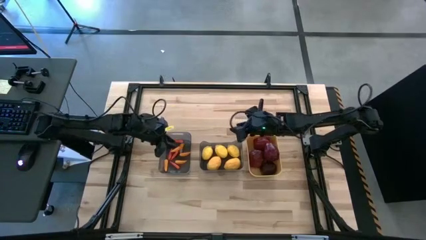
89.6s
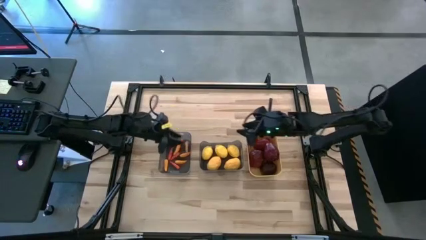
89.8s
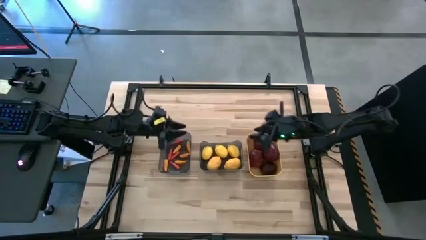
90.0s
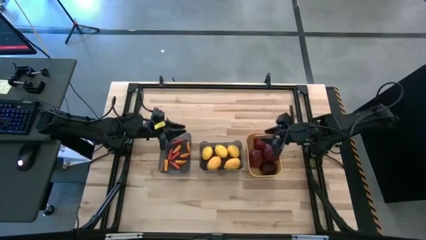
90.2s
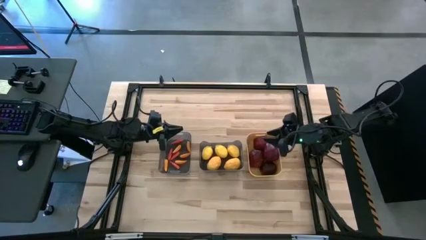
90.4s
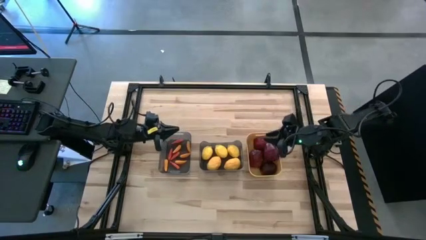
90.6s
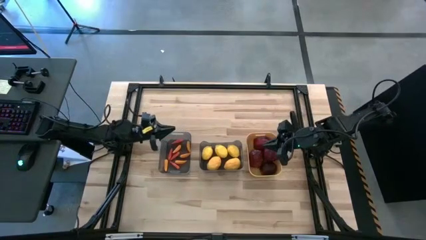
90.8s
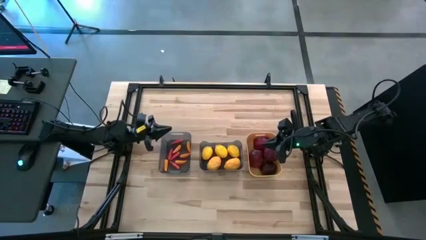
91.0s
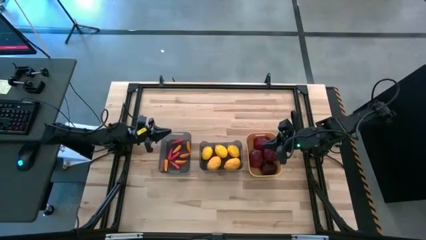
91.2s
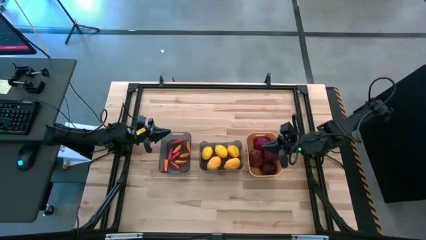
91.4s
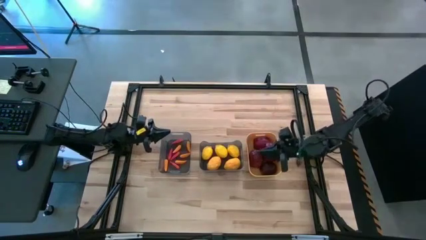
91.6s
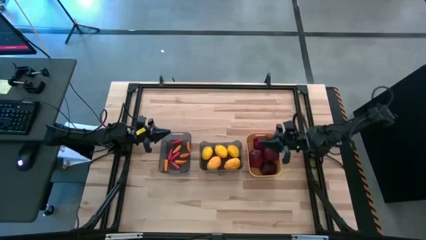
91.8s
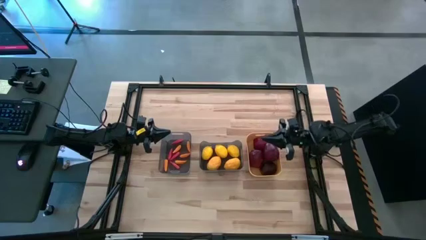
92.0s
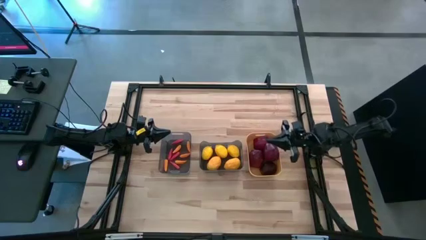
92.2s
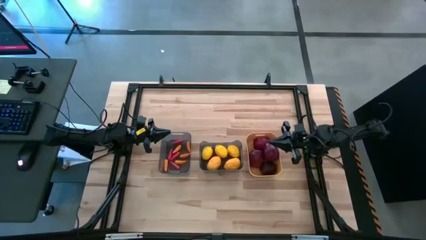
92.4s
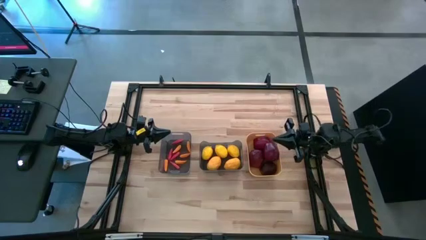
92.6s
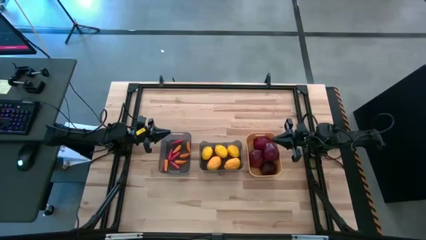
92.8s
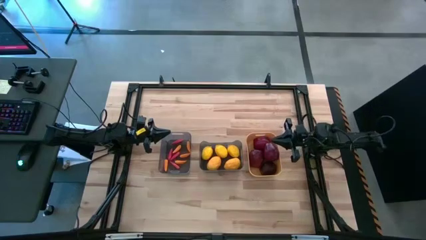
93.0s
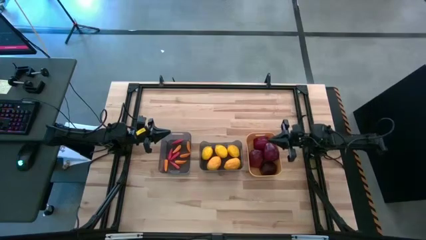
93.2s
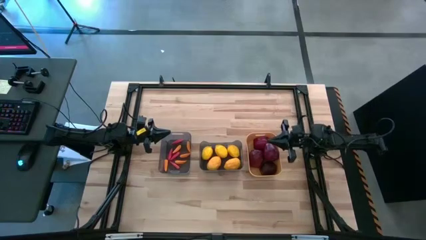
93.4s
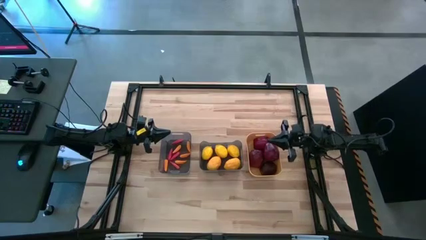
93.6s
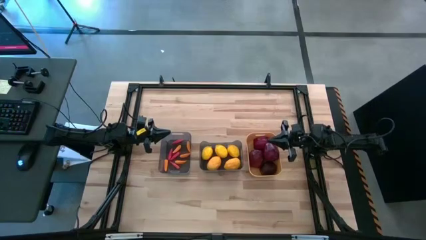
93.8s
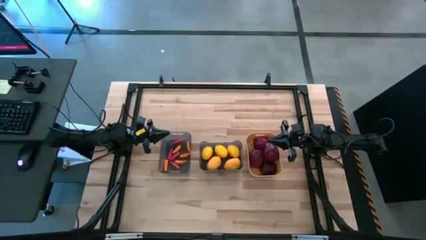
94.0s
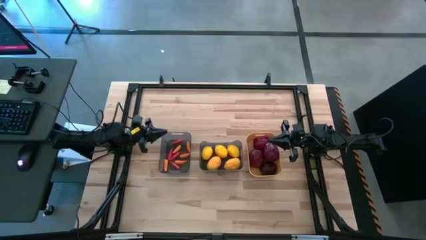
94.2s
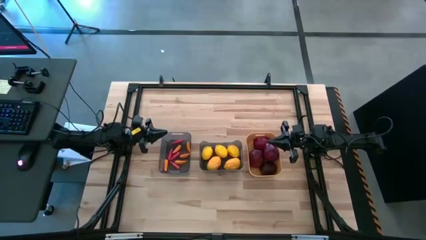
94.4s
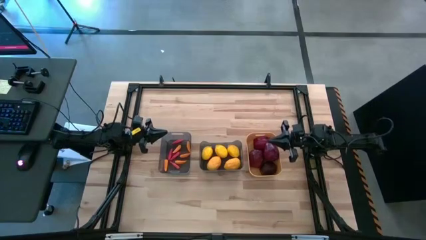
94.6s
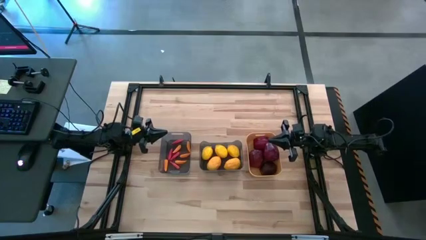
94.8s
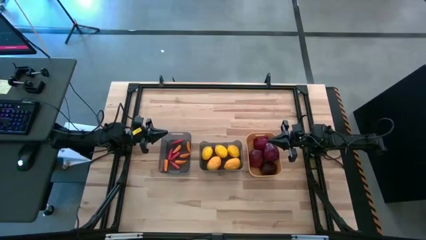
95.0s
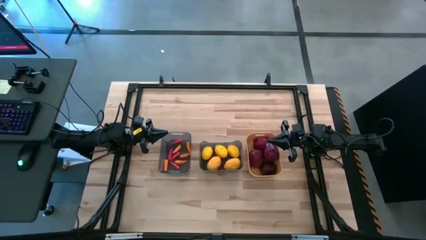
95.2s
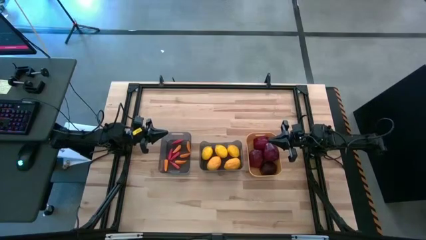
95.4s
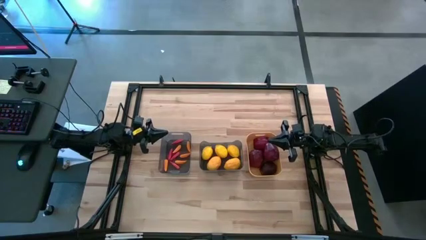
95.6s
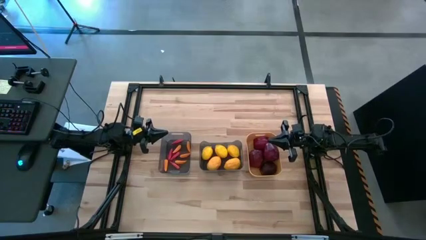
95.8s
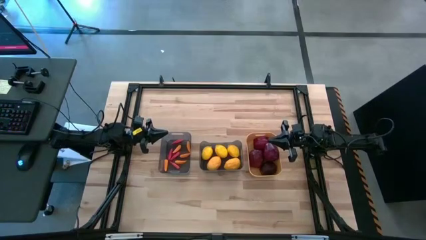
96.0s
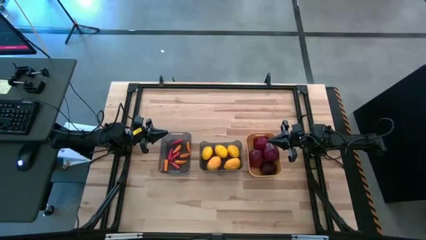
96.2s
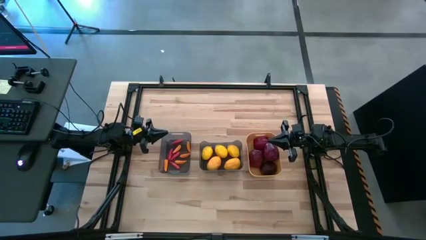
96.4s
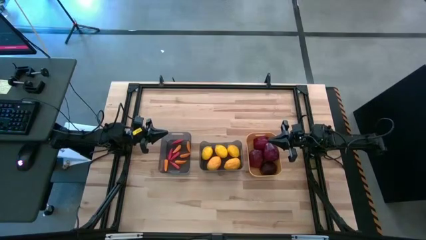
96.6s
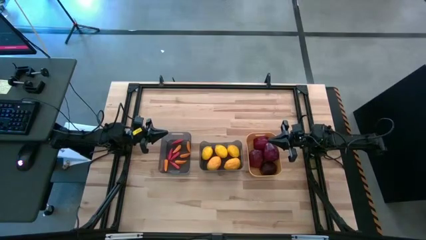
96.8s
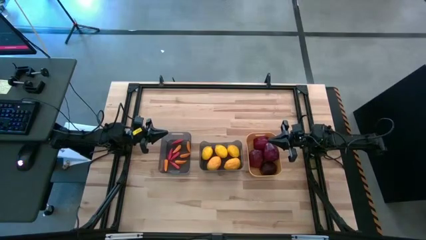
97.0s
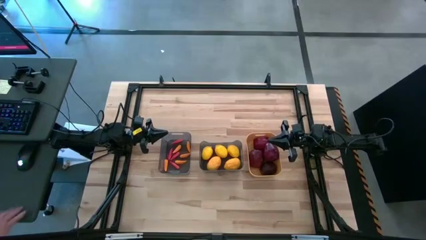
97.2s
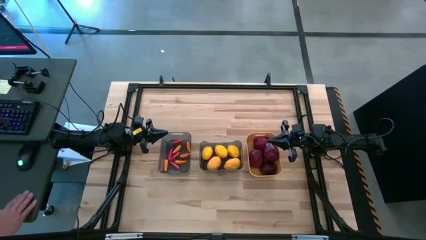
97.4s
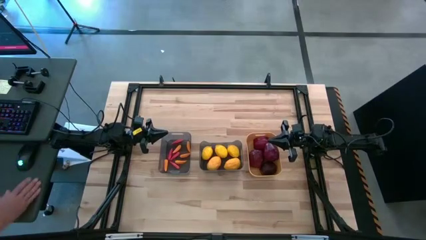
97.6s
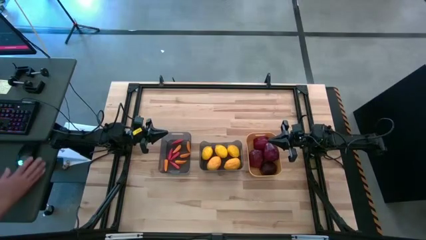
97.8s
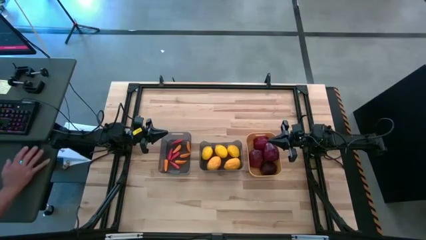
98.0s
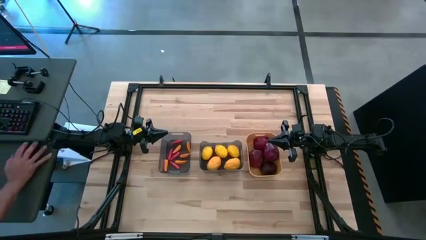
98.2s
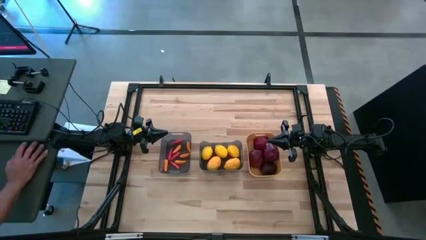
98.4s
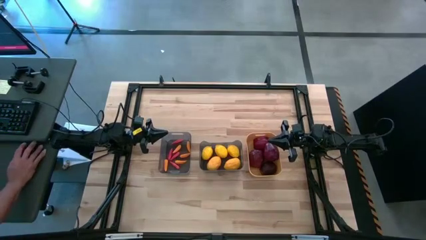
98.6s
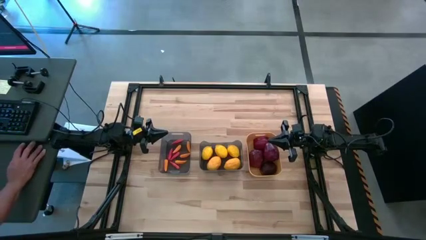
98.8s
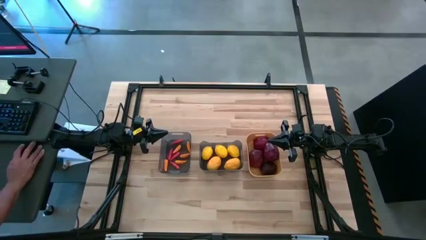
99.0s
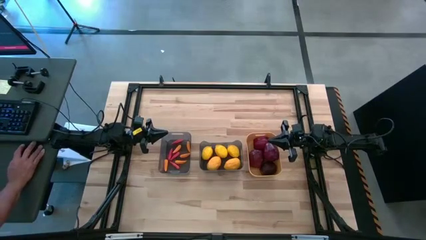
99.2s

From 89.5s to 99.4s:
Task: Sort produce into baskets
Return to Home Position

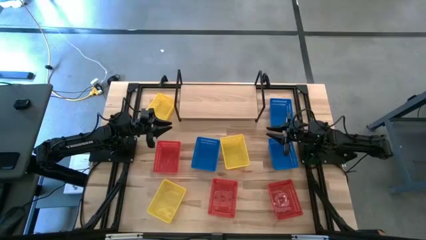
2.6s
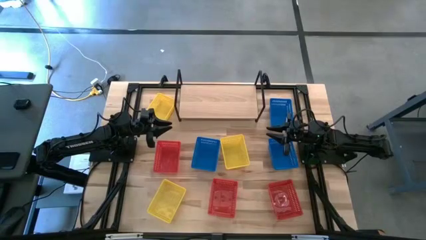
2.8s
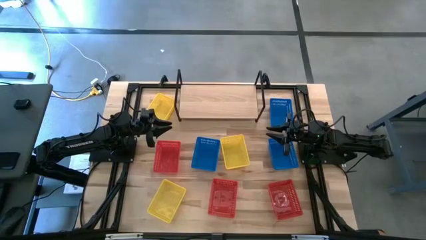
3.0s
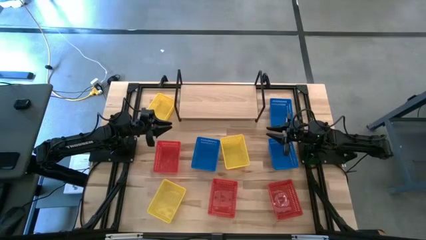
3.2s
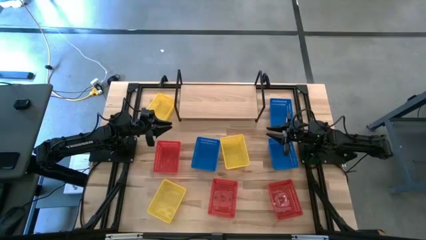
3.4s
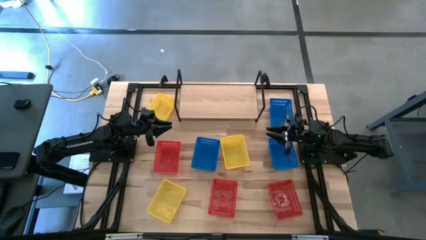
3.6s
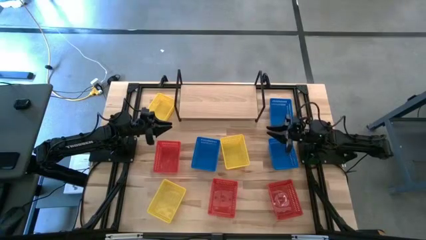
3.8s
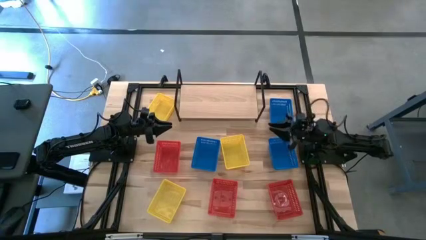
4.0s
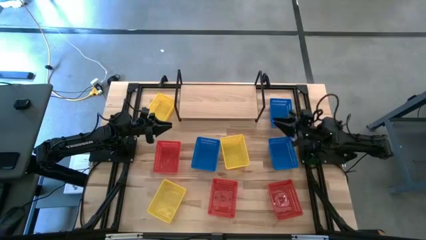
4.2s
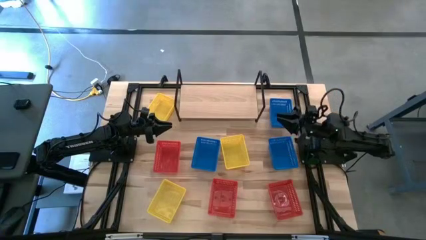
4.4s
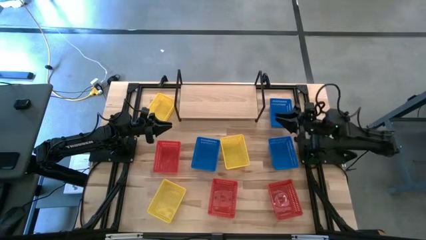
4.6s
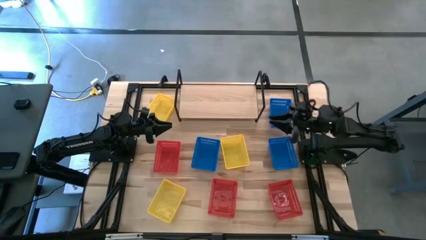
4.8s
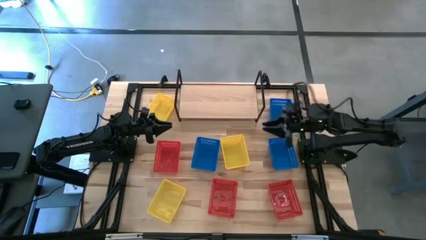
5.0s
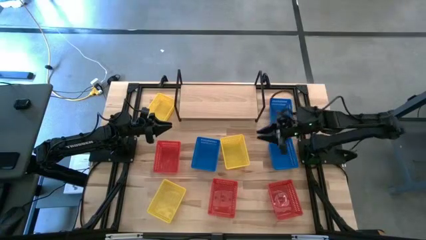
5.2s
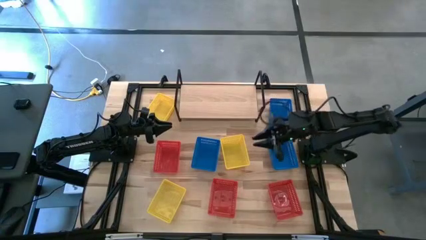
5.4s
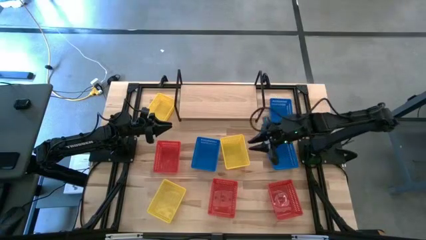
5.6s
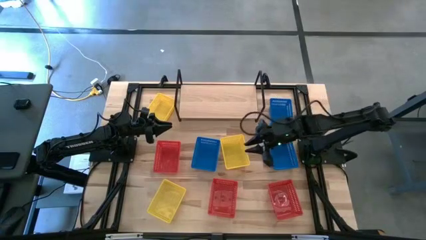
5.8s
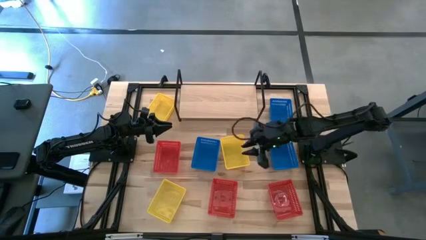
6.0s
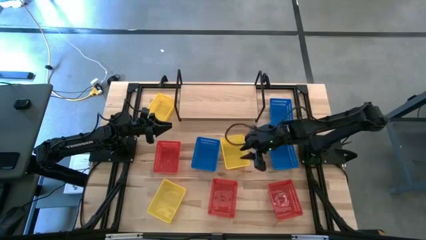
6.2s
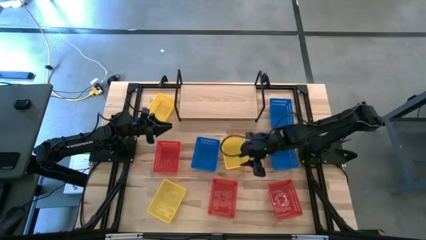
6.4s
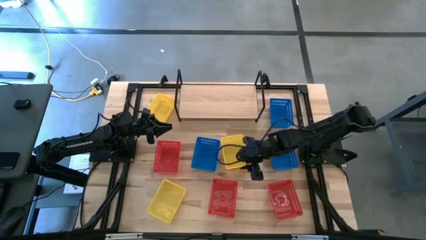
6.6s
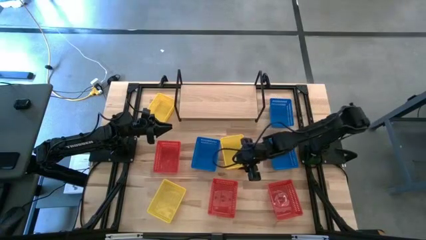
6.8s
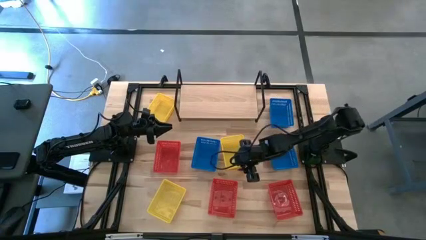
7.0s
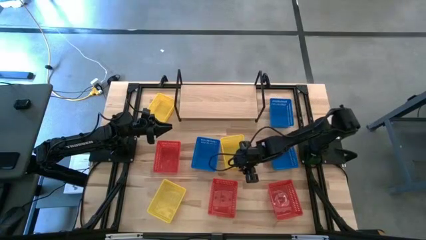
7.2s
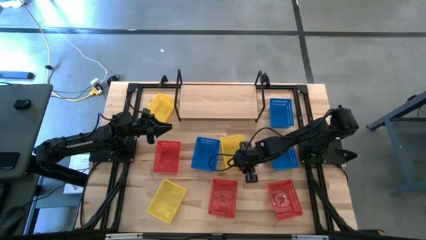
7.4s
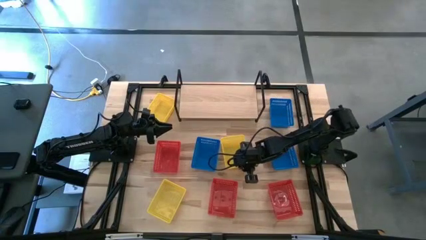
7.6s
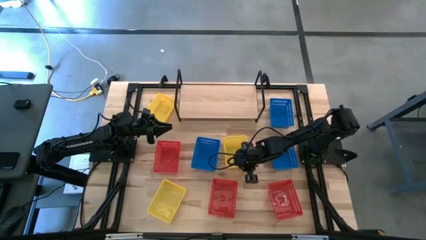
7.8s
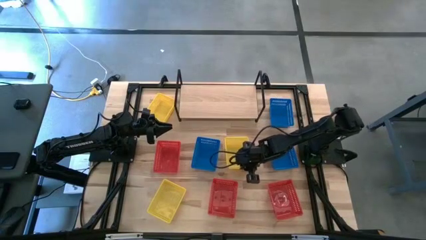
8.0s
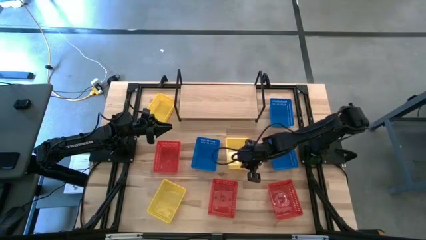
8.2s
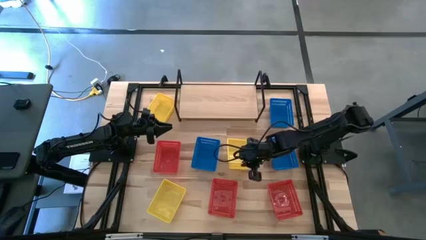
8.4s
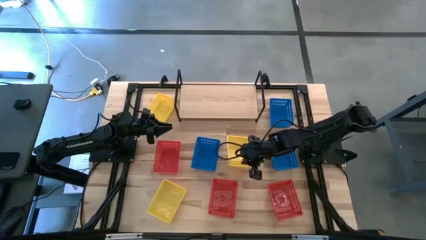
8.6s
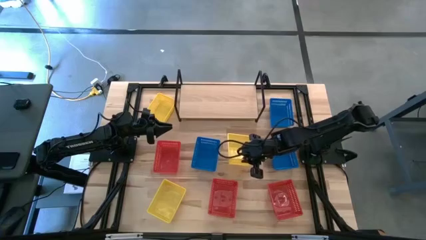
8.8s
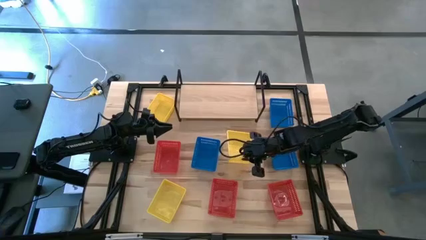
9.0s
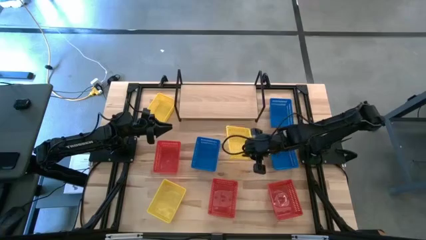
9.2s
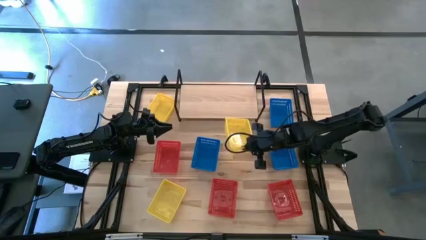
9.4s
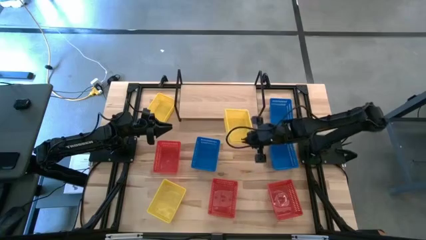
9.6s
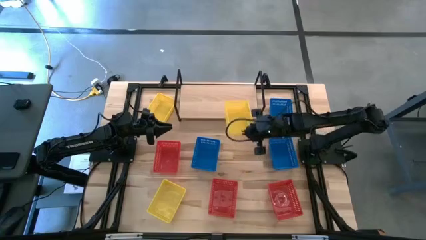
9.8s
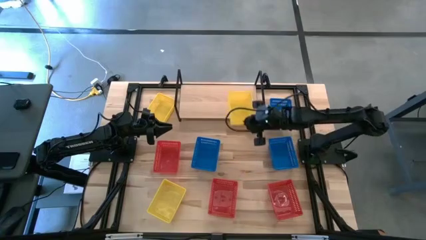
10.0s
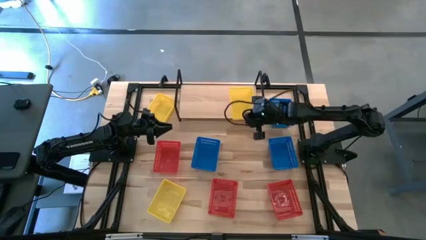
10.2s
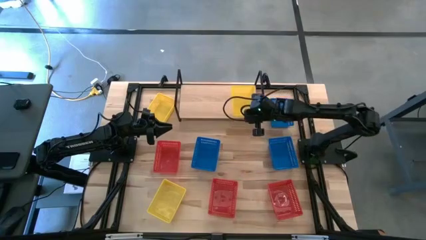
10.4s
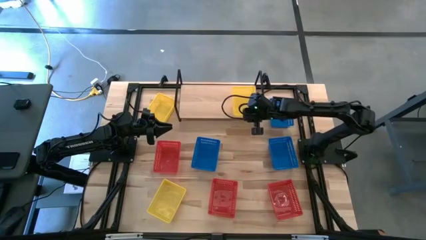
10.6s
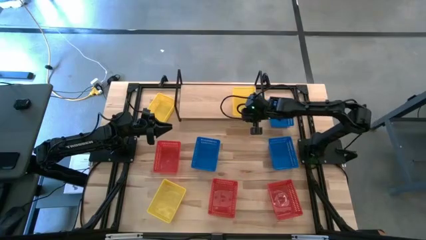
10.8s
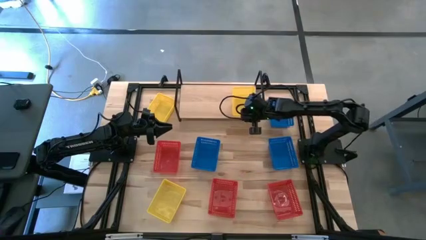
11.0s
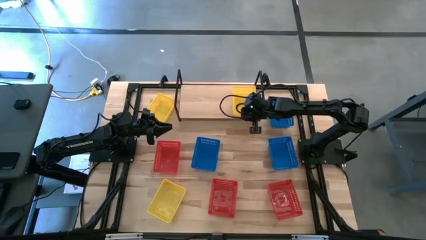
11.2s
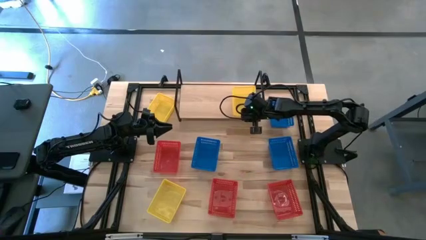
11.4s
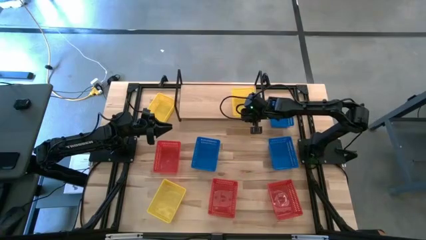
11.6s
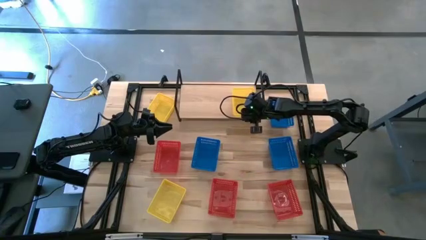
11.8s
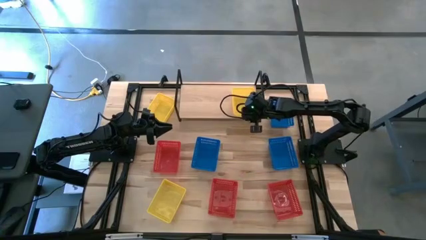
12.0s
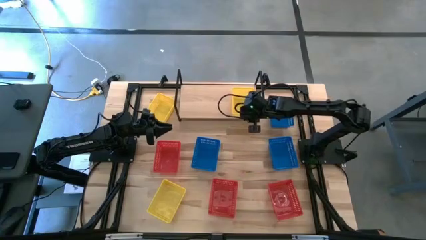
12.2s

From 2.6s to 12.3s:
Task: Stack baskets on shelf by color
Put the middle right yellow bin on the shelf
